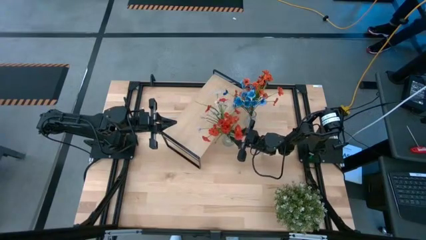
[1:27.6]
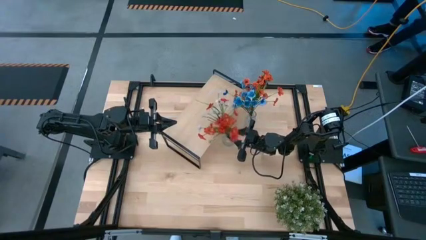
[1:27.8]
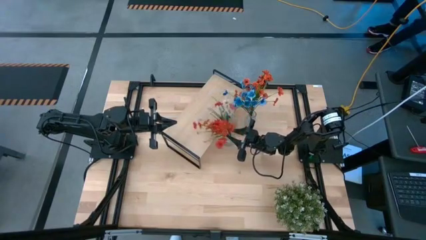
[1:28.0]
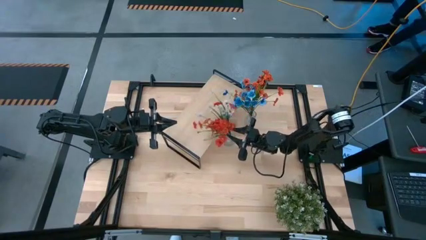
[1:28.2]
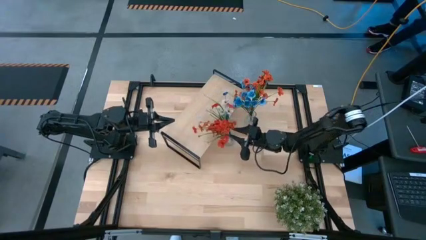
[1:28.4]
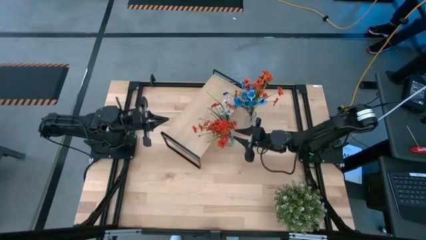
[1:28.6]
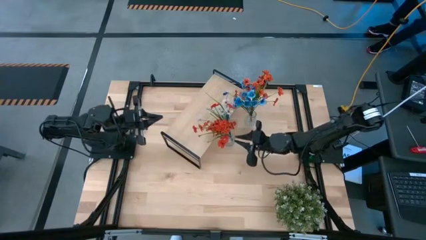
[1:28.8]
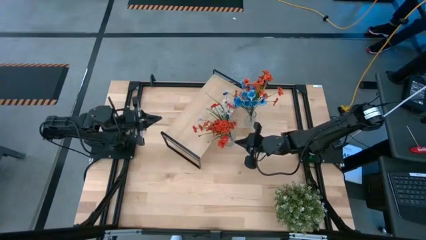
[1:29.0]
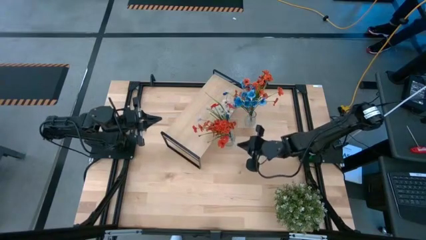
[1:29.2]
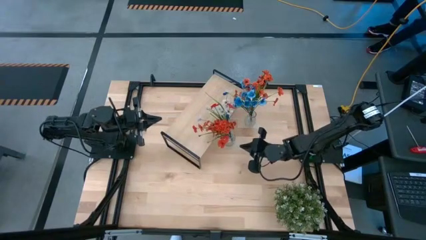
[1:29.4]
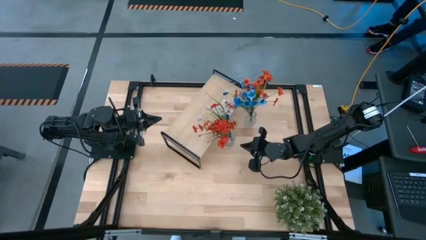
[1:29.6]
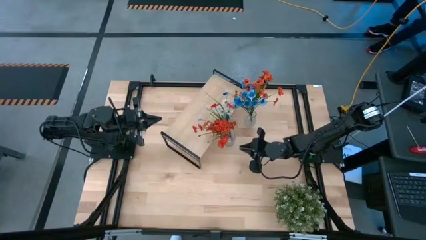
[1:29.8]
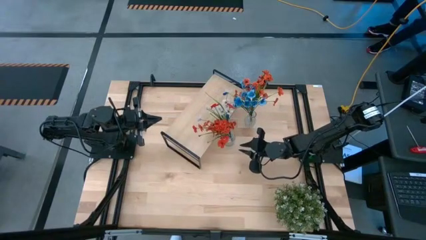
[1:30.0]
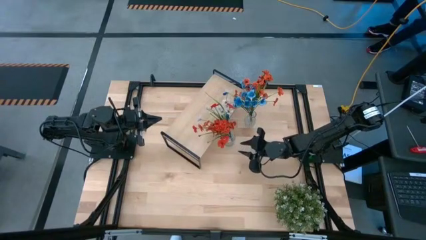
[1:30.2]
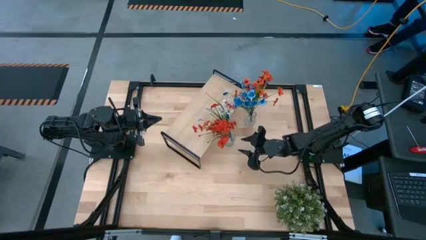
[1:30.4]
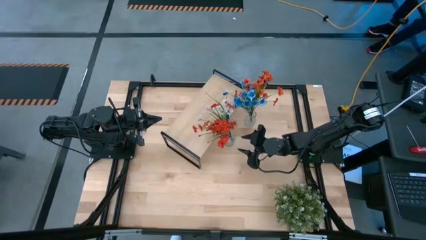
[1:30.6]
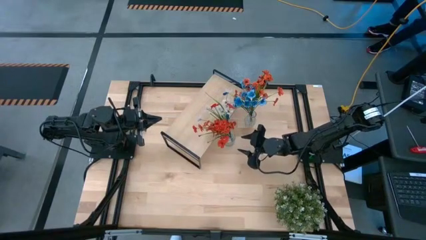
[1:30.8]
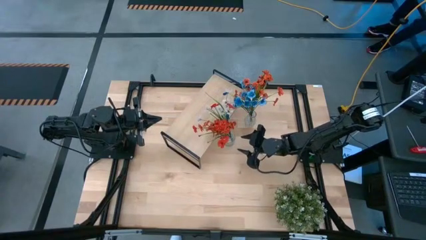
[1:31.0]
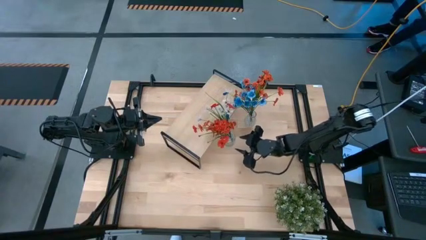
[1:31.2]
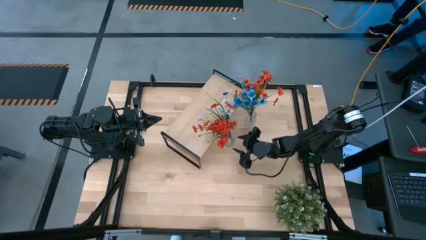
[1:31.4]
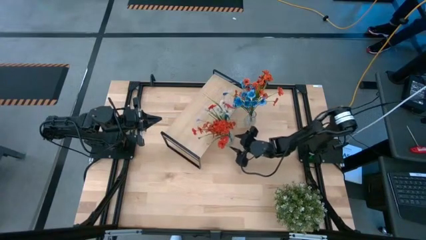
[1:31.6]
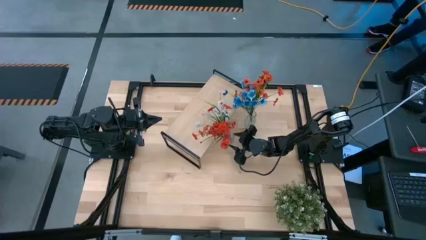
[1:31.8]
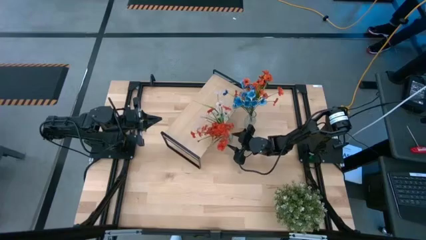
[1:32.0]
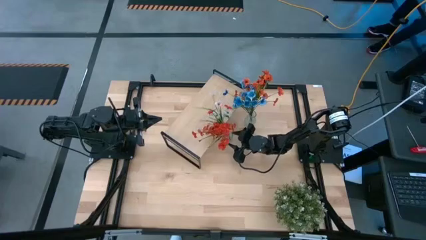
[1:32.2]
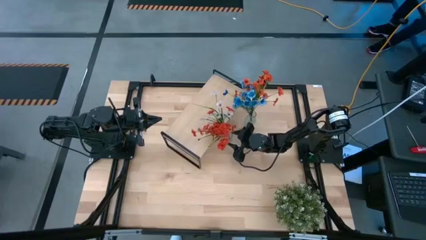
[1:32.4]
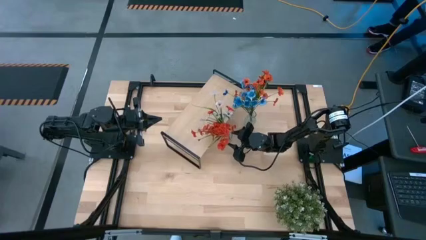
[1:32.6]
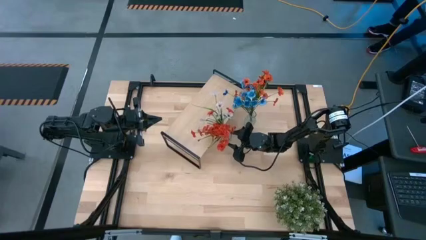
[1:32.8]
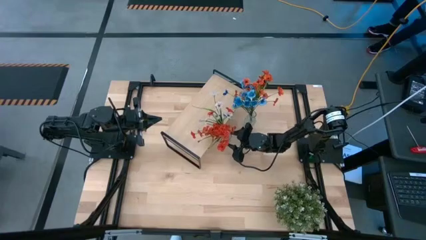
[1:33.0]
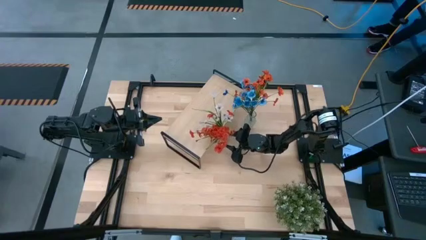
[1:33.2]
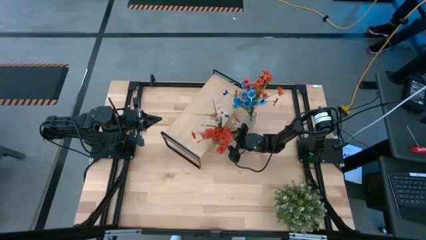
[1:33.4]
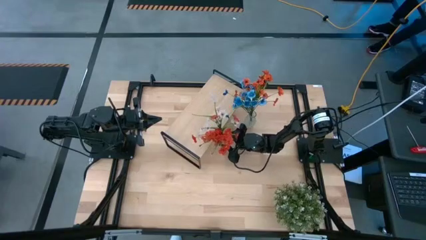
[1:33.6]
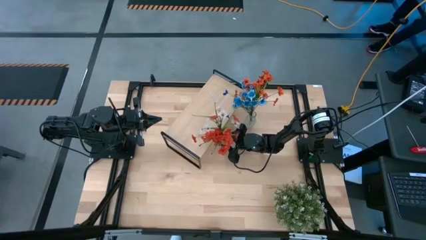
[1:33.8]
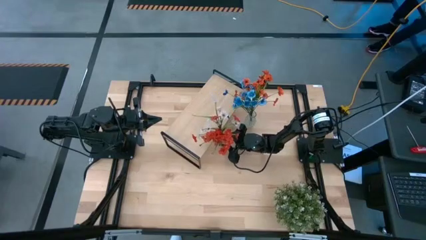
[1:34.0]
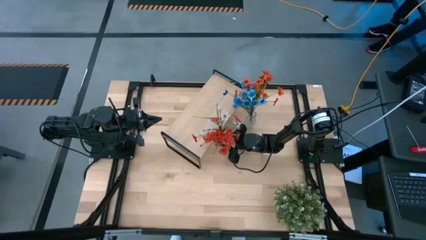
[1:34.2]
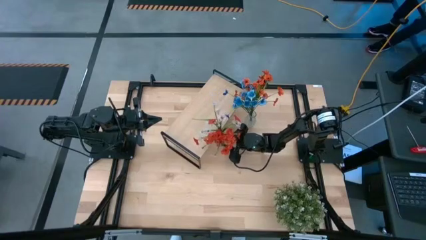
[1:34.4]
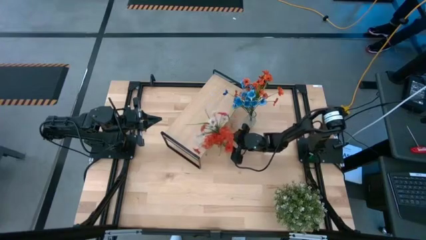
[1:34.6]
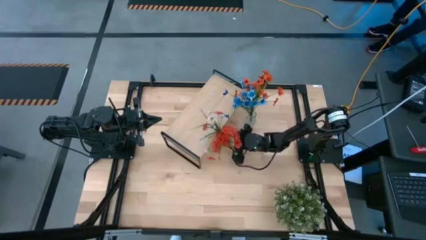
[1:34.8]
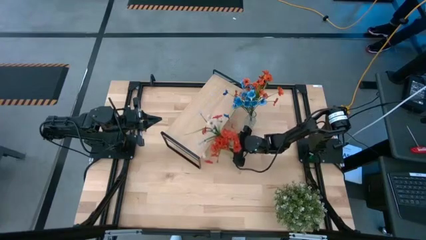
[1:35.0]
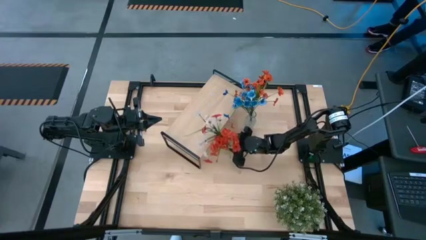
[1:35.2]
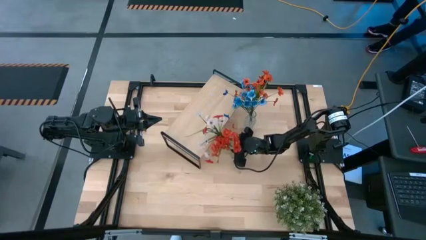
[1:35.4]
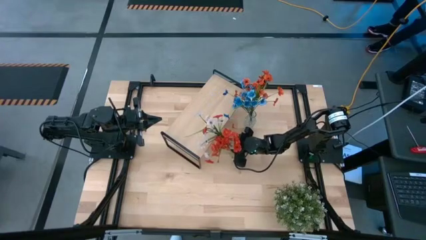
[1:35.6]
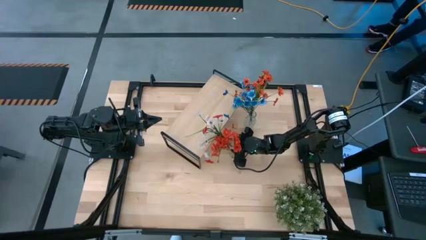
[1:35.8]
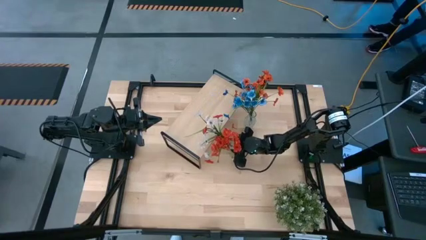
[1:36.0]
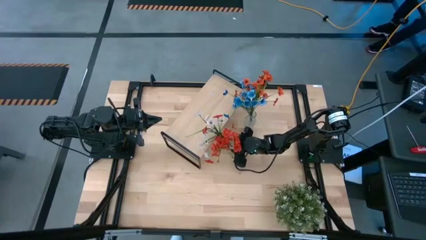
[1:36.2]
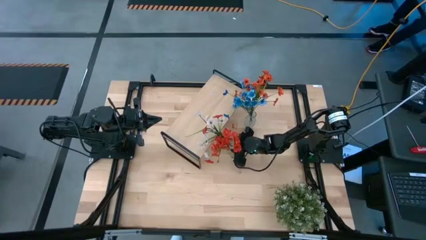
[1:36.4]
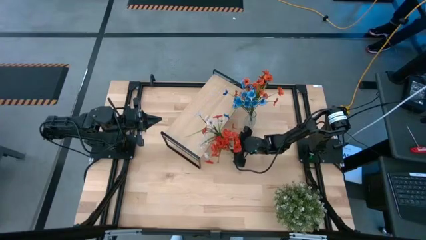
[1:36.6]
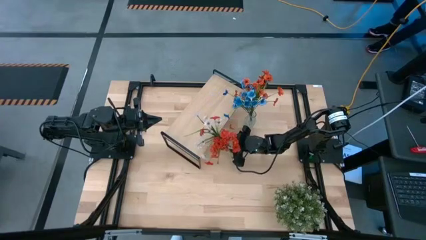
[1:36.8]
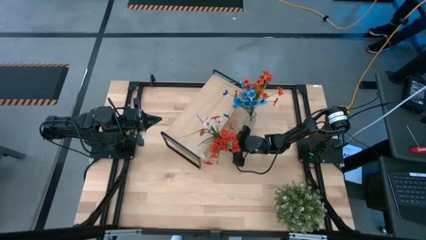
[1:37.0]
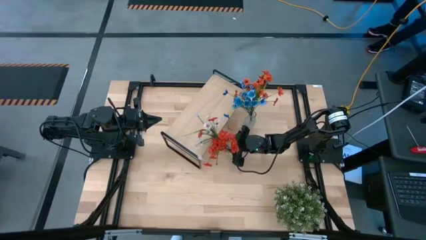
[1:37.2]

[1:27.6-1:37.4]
Task: Pick and place flowers into a vace then onto a shelf
Put the left transparent flower vase with flowers on the shelf

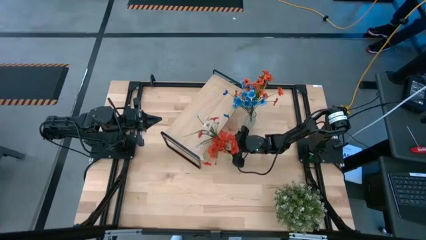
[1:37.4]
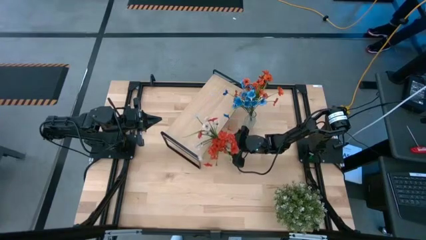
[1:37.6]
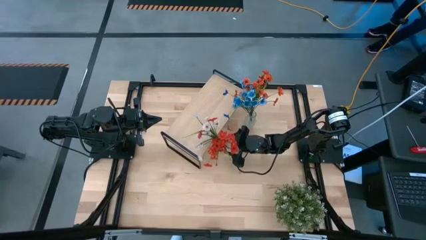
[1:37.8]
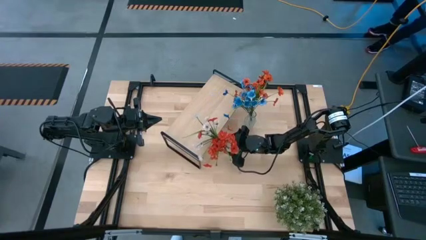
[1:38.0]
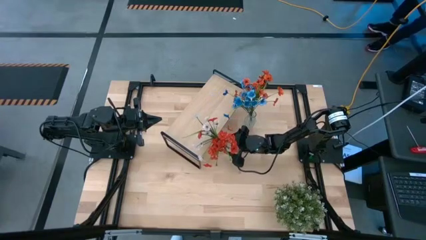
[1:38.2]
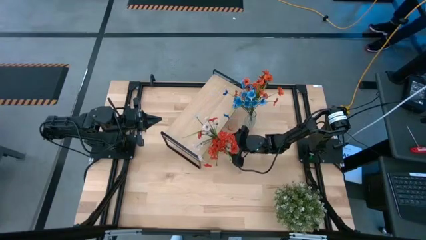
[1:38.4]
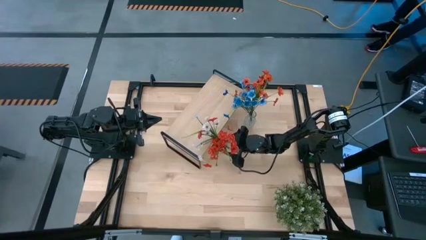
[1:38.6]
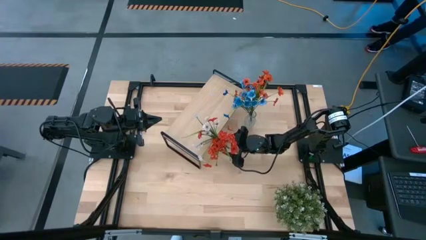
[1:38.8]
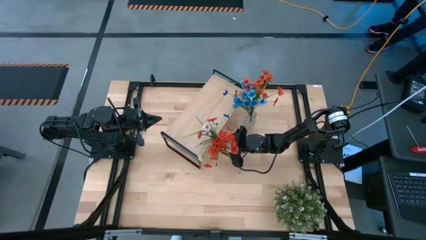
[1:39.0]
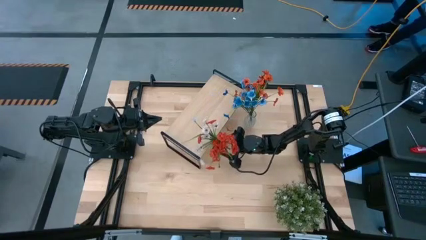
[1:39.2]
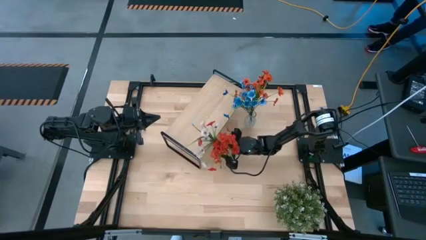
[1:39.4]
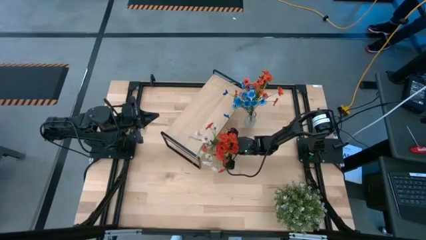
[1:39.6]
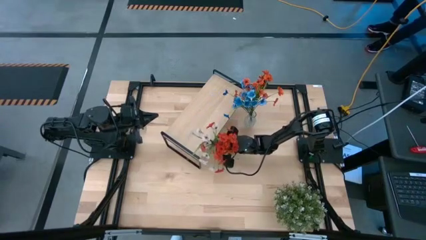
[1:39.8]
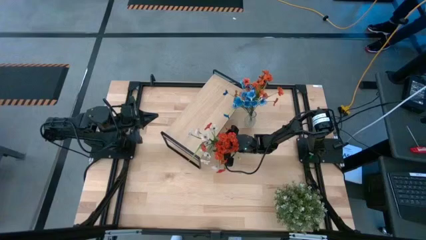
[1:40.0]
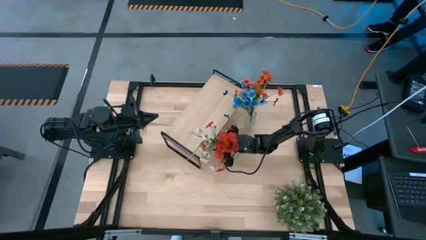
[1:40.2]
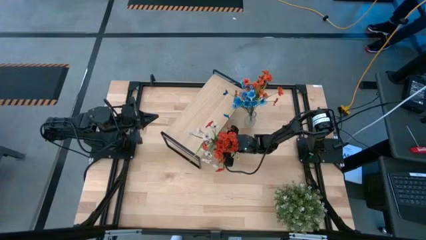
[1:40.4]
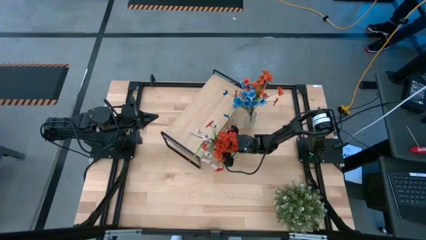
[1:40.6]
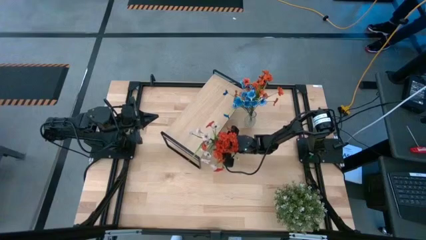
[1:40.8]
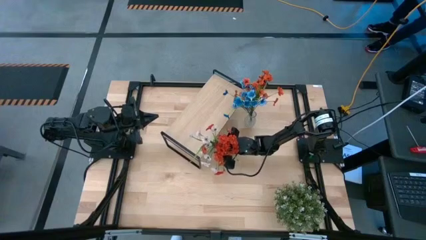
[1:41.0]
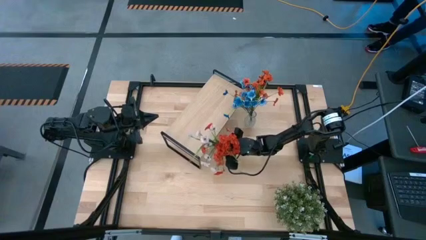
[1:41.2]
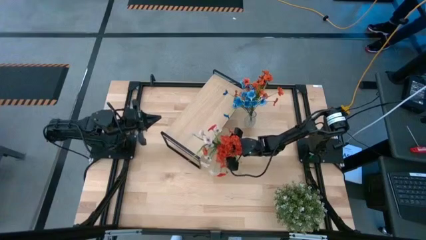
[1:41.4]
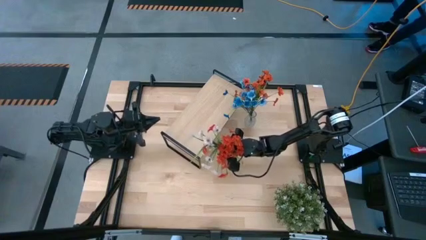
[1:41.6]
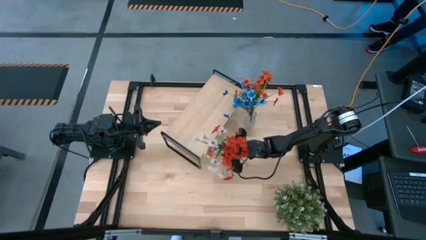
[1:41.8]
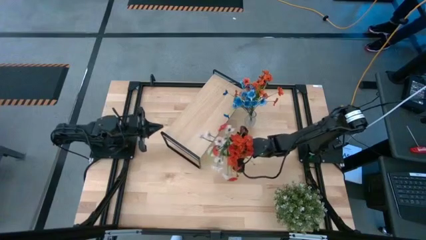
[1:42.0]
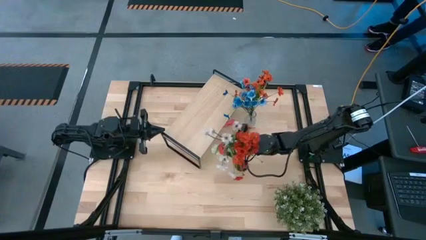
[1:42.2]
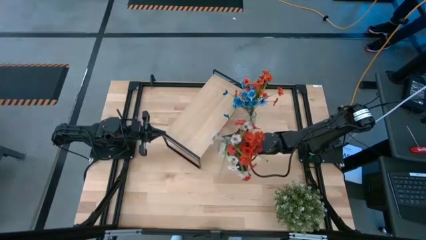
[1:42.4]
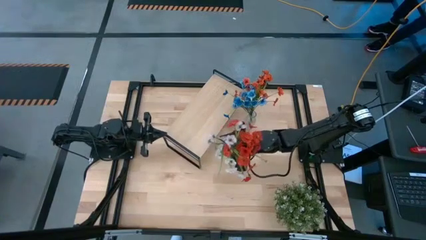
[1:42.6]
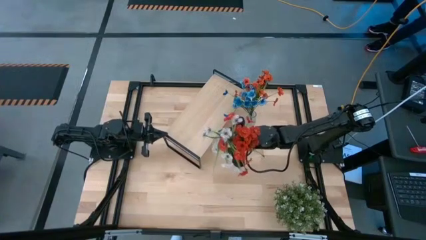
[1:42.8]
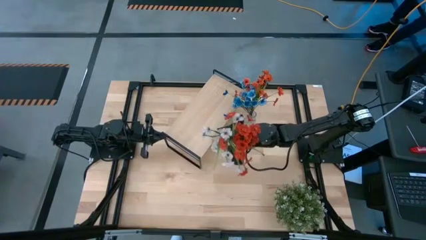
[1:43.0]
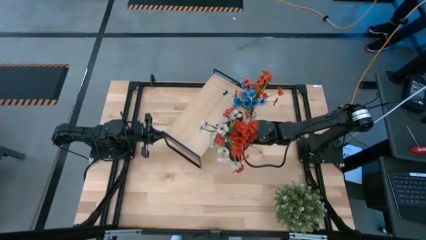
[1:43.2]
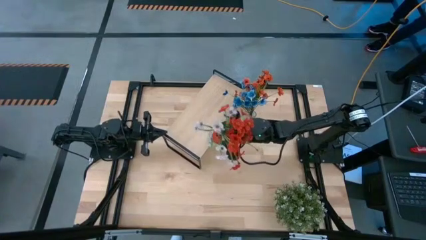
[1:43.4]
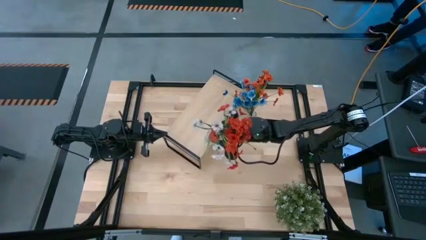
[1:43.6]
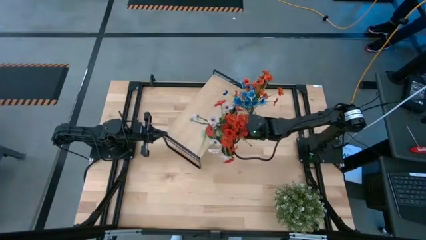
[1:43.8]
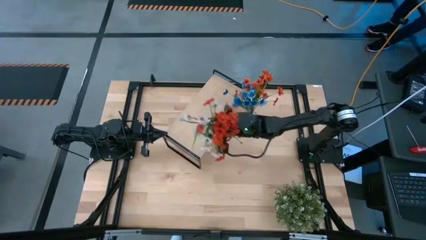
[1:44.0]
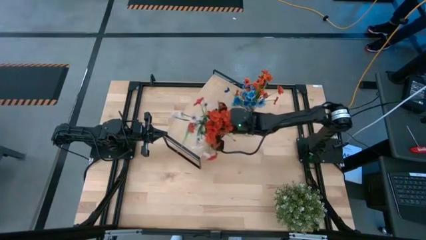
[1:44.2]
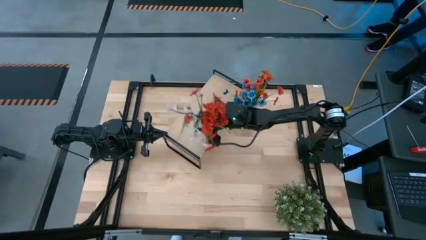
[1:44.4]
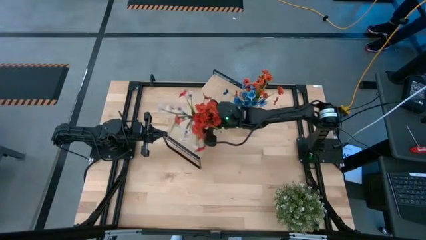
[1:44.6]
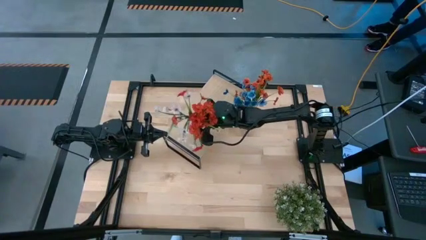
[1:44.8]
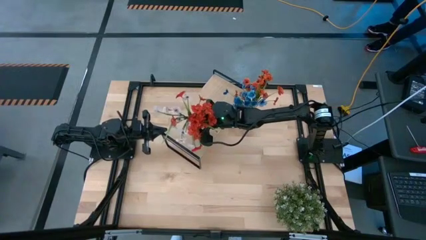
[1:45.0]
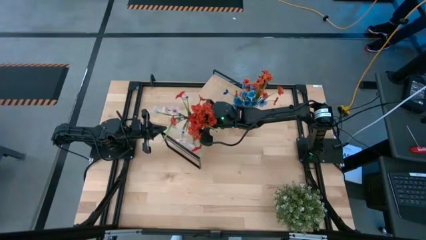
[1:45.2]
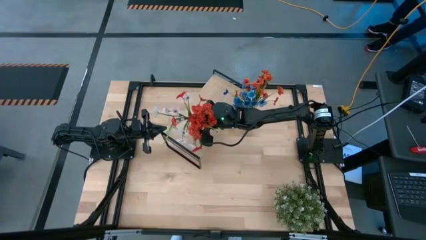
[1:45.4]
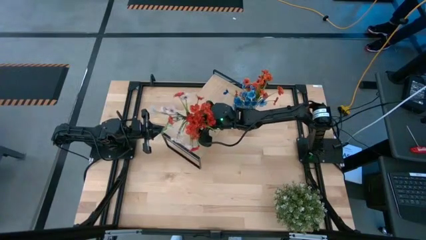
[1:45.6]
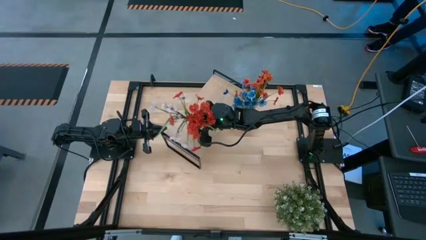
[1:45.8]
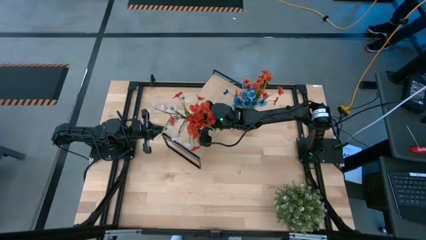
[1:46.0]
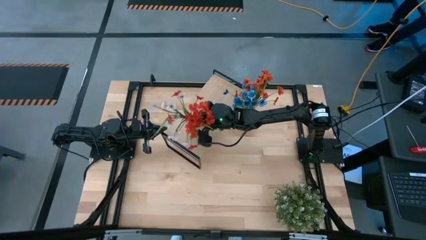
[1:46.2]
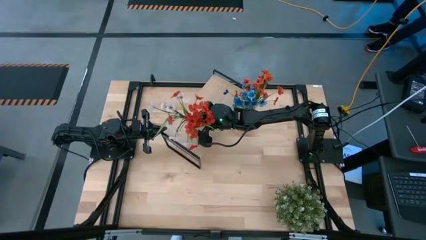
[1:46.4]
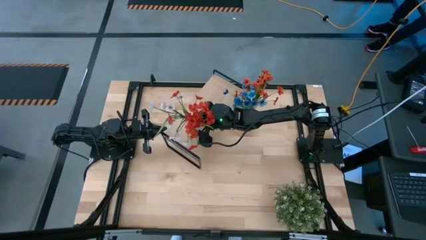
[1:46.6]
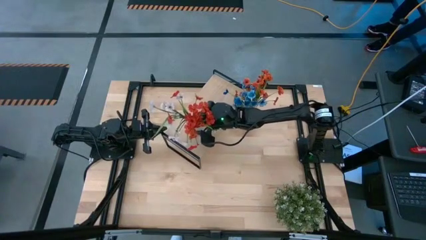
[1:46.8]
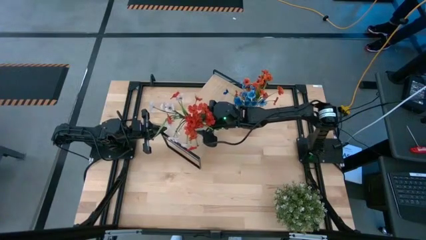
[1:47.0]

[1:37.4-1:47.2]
Put the left transparent flower vase with flowers on the shelf
